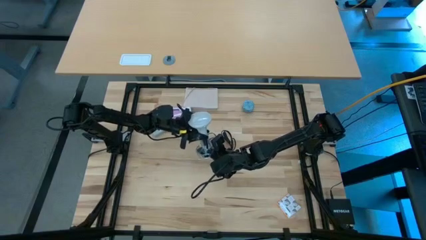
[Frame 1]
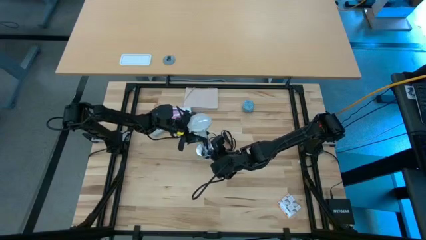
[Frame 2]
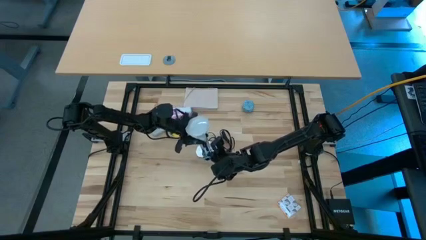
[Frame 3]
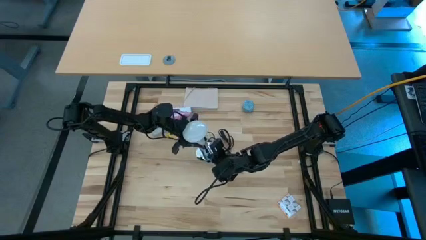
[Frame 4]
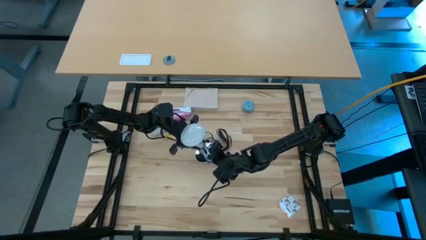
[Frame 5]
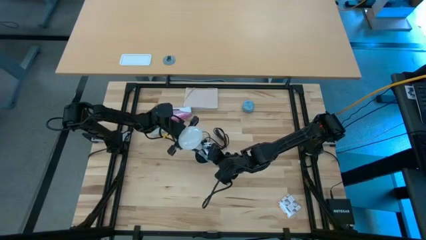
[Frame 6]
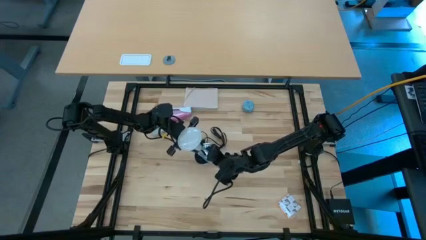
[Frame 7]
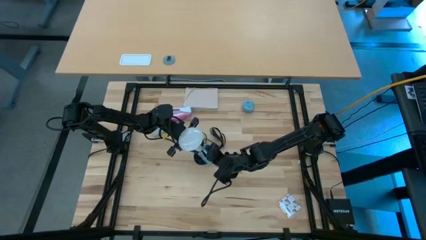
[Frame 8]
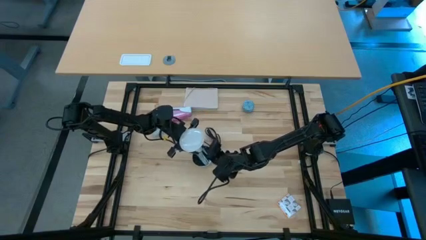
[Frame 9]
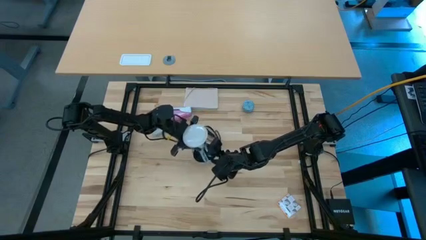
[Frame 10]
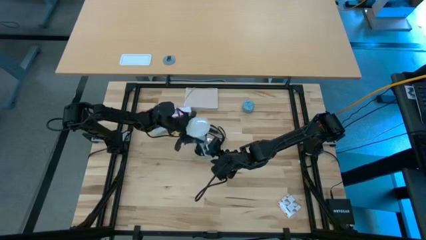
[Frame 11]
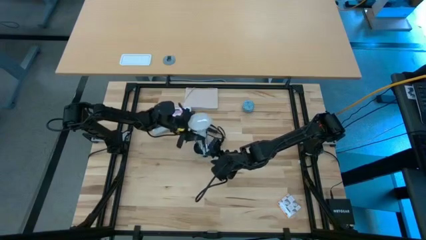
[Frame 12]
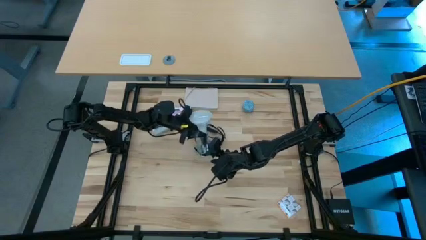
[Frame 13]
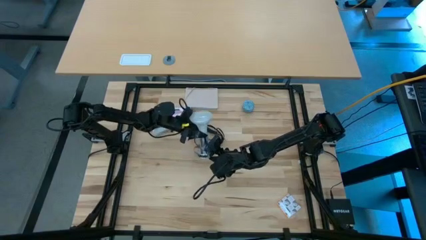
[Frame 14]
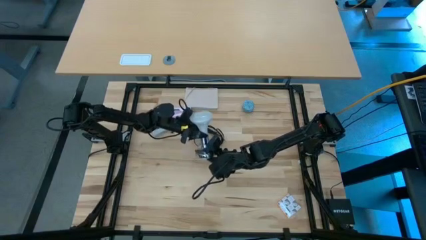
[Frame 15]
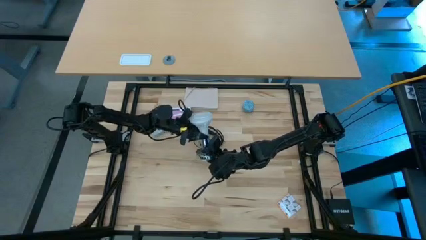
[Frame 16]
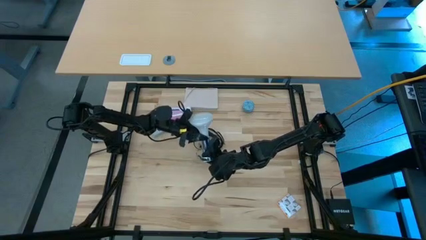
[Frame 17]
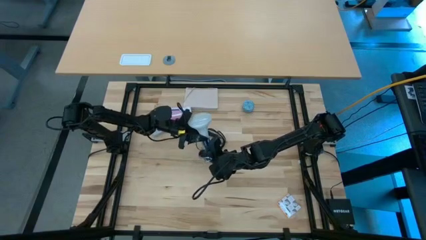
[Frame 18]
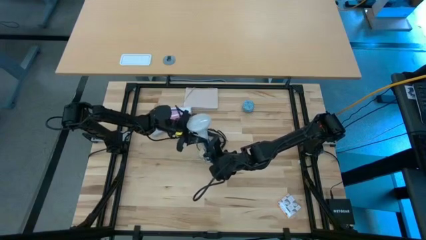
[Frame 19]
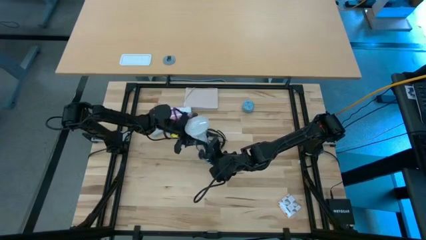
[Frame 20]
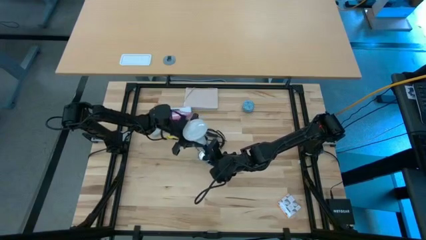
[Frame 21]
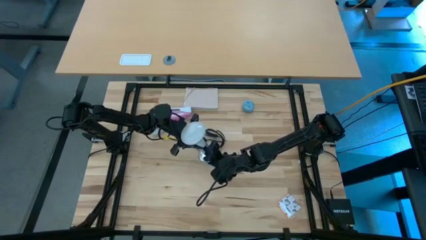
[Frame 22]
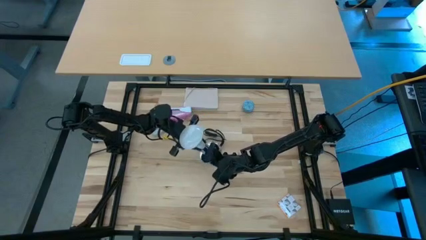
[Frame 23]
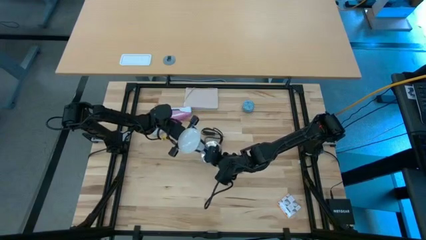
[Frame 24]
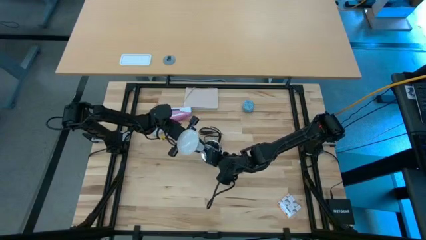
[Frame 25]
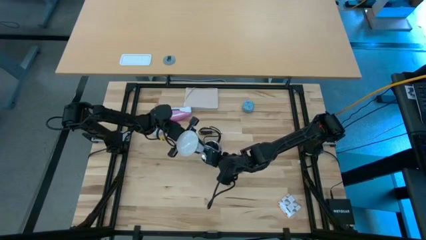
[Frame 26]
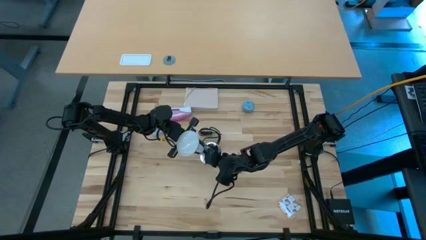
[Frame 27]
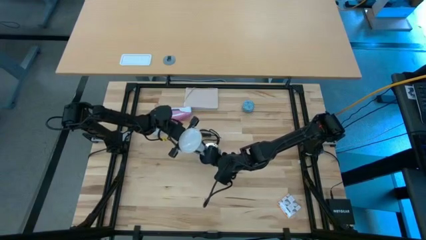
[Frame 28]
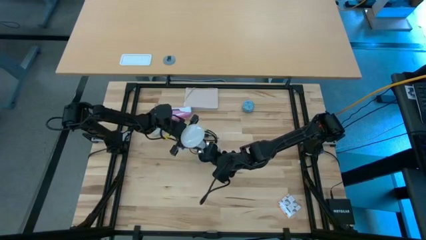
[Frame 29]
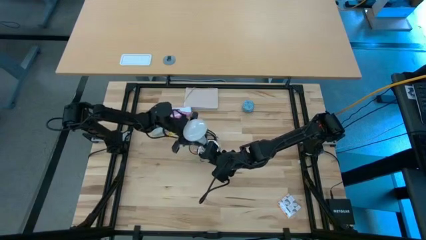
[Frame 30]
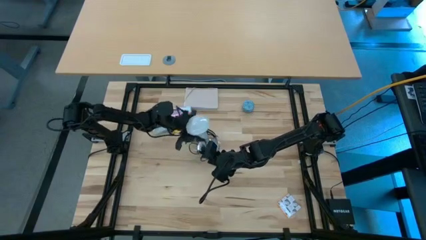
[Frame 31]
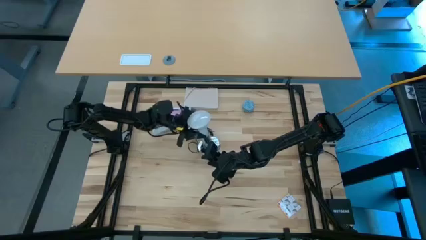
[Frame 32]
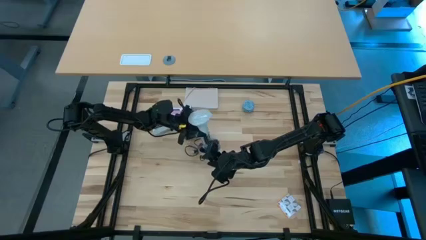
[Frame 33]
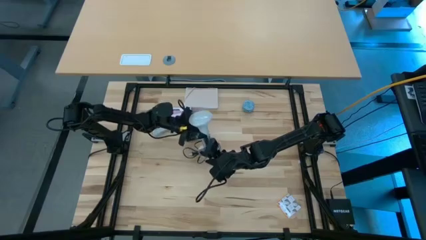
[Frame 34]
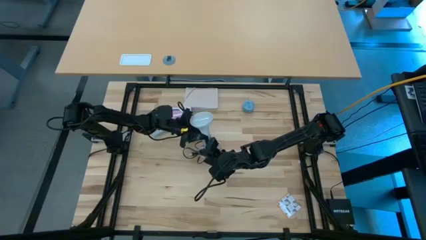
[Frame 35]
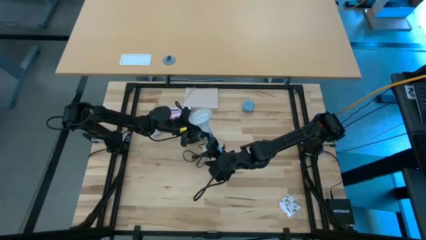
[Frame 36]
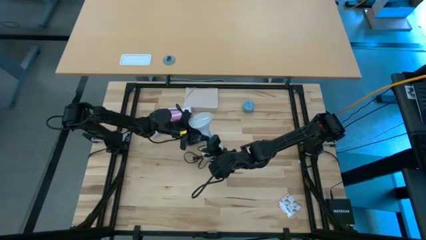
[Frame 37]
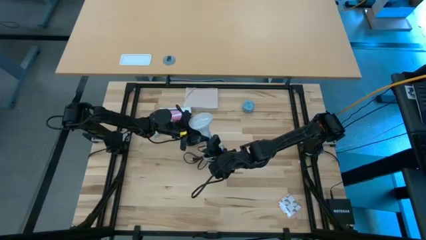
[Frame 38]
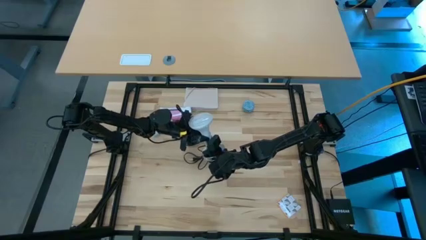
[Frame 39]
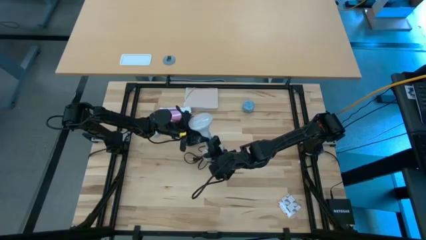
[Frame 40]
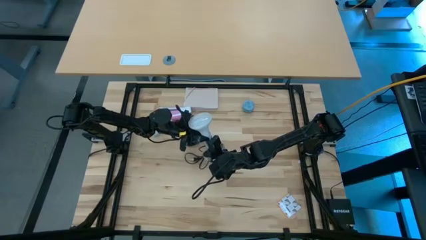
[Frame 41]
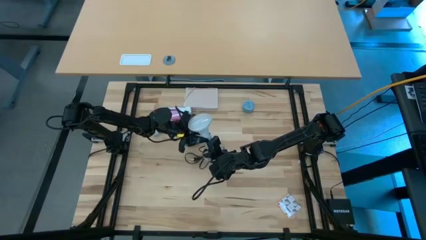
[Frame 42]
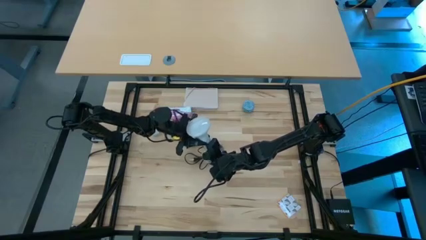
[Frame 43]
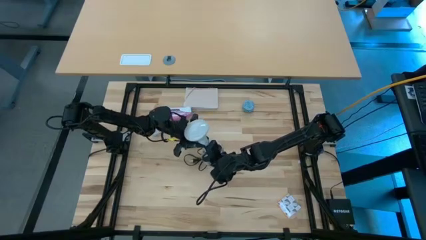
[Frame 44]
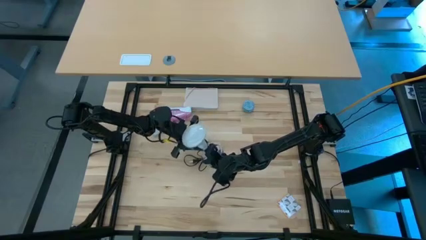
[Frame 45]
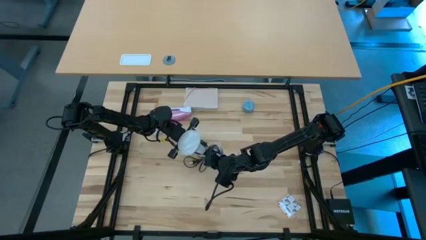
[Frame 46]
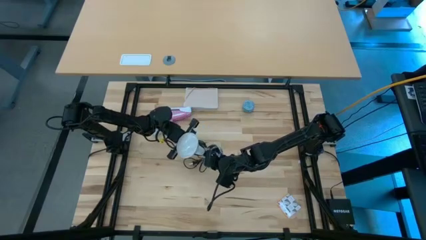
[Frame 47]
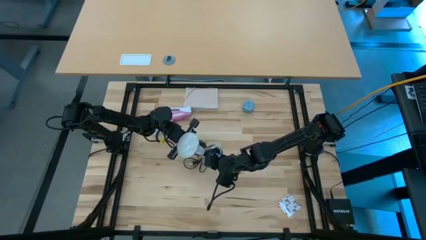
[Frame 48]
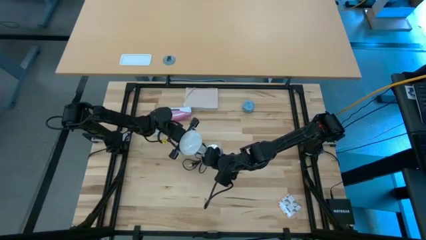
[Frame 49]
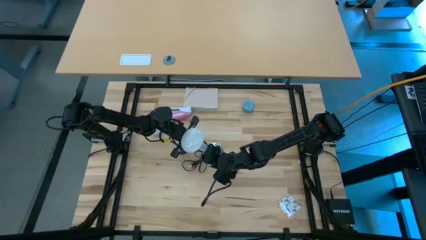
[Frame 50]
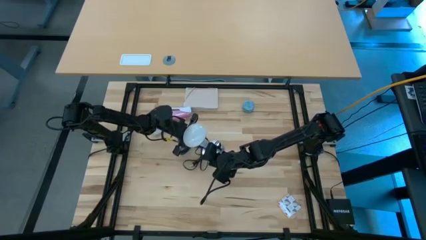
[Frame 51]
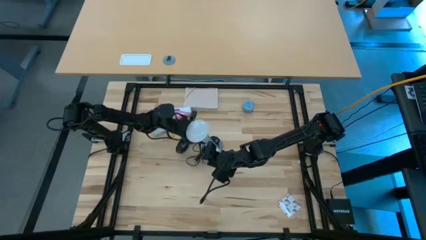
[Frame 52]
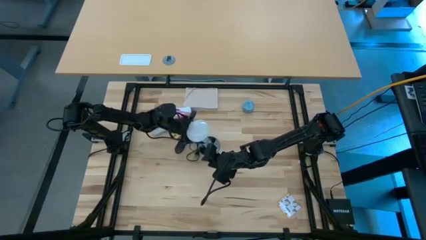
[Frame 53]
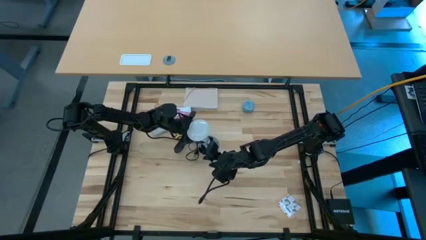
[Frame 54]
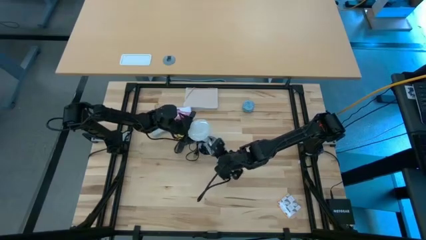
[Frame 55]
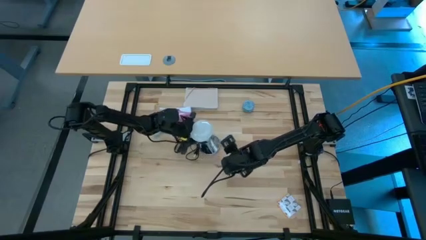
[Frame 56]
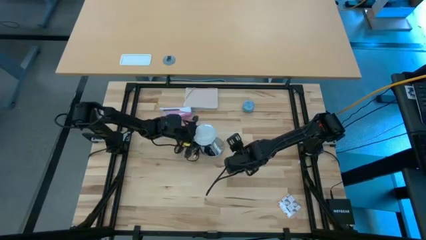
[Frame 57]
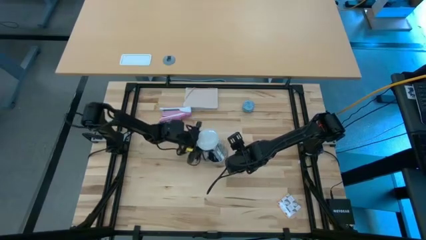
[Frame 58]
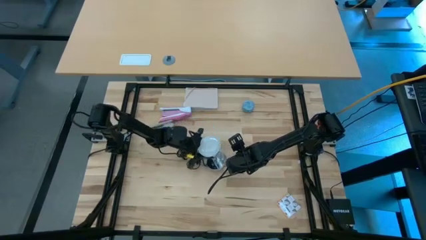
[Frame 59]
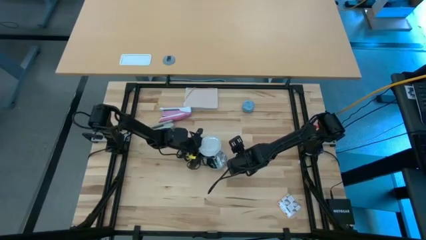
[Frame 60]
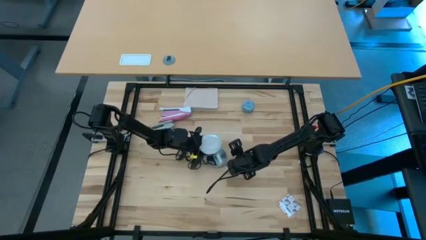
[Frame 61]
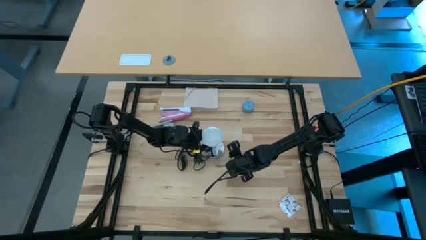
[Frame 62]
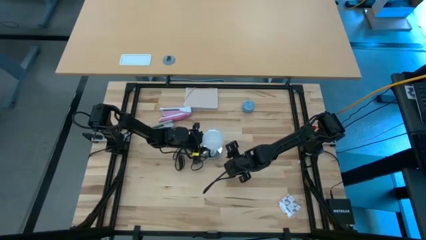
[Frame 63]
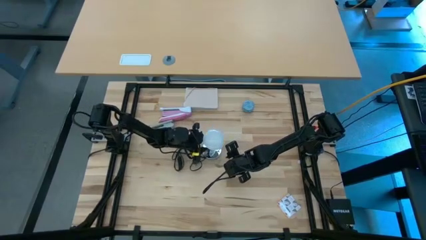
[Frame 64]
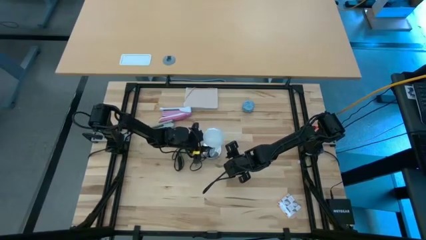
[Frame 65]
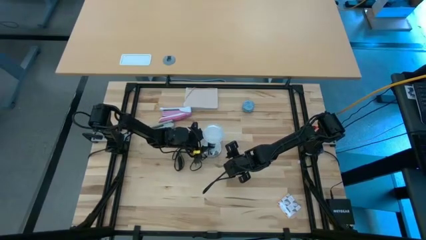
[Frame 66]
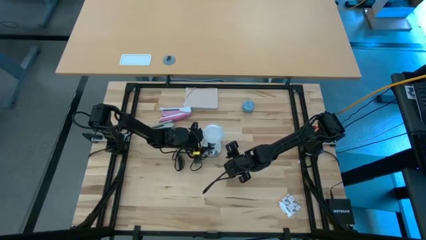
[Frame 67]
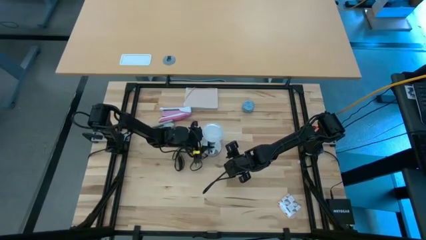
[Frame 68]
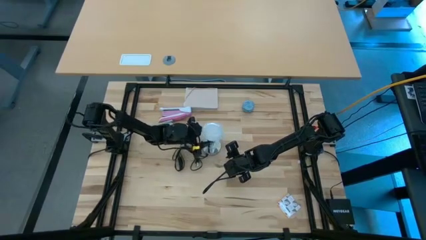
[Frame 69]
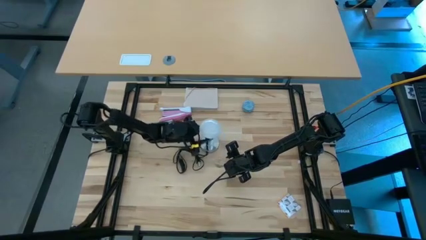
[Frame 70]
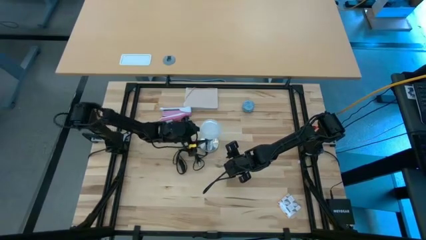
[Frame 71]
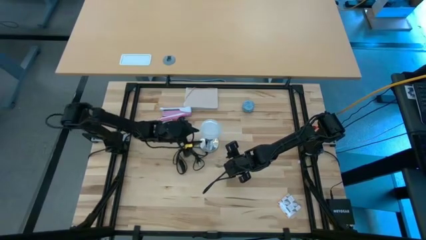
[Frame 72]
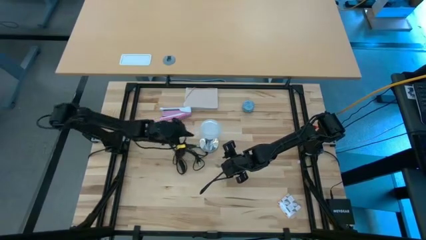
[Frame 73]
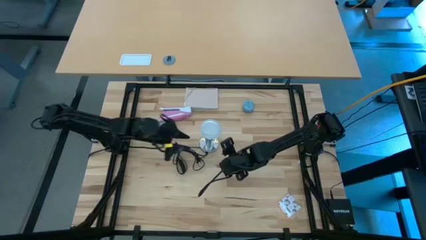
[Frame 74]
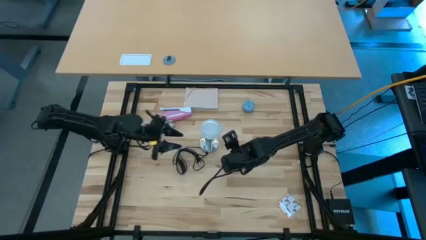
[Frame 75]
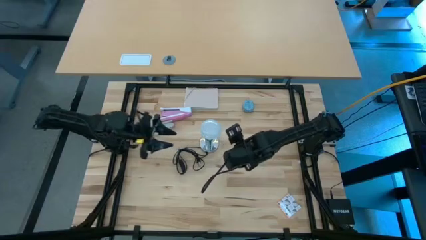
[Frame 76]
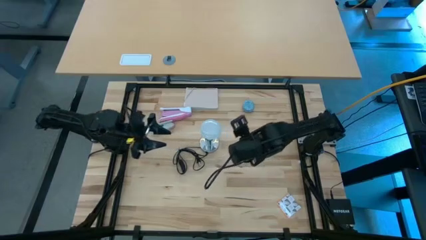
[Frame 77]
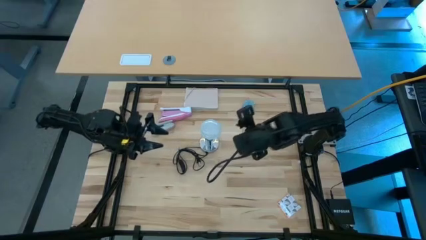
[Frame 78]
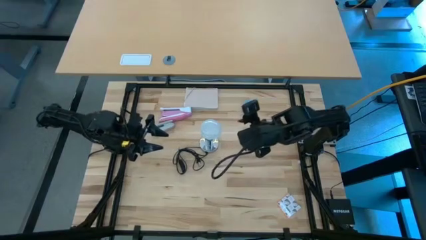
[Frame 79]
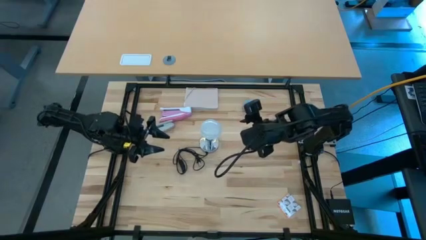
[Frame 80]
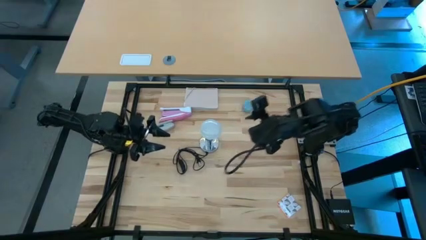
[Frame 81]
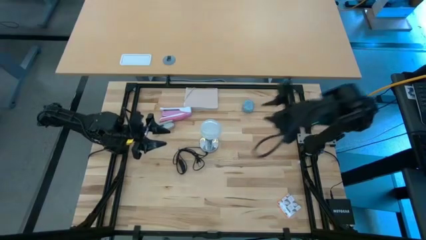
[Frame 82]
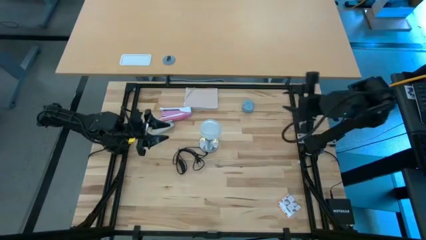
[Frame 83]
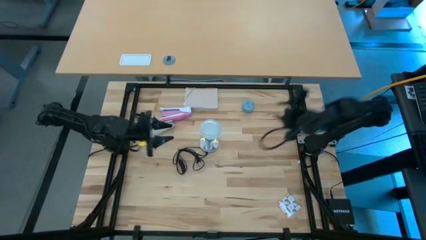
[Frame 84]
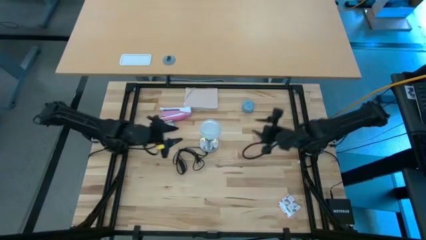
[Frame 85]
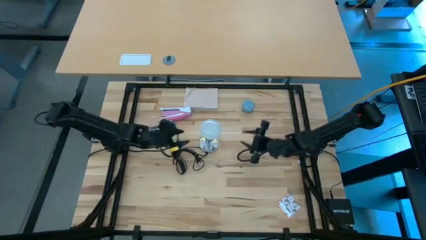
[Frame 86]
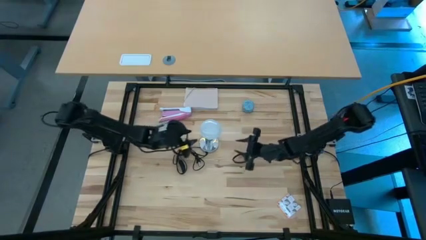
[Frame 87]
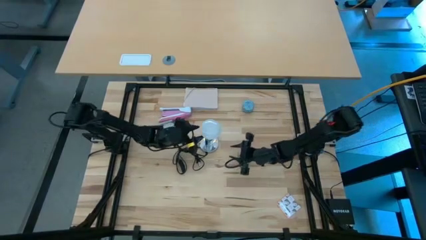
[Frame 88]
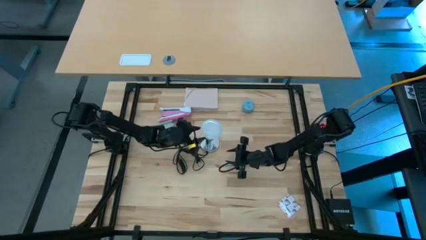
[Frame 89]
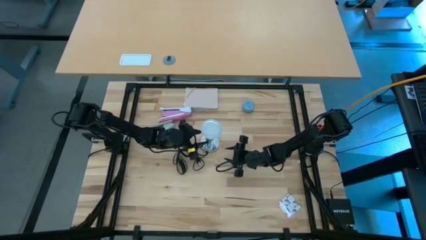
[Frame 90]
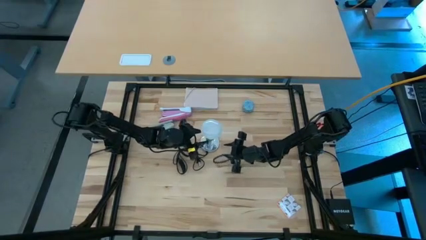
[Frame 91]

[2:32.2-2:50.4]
Task: Screw lightbulb
Insert the white lightbulb into the desk lamp
